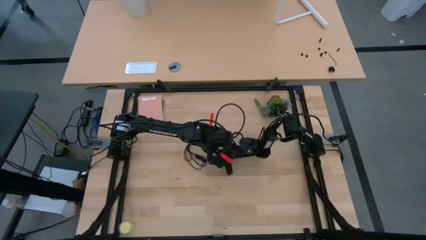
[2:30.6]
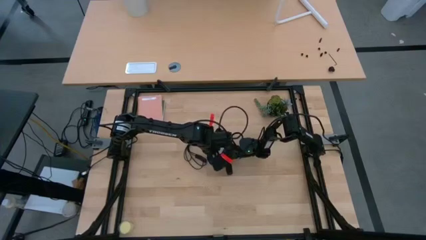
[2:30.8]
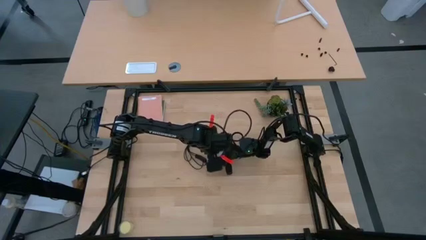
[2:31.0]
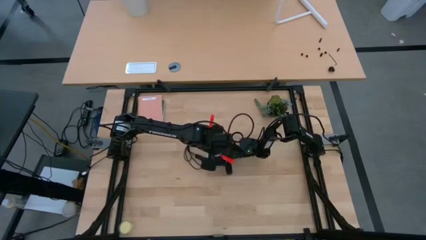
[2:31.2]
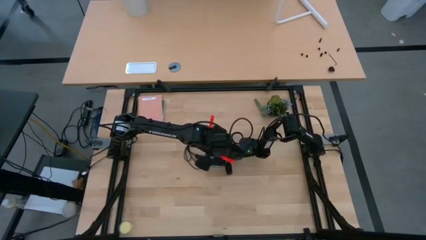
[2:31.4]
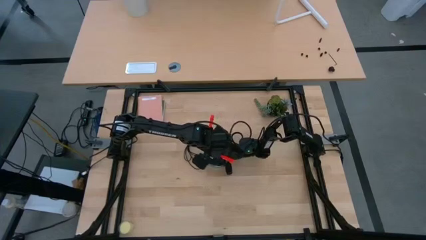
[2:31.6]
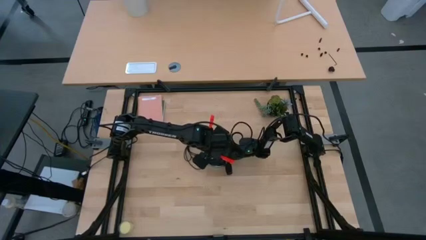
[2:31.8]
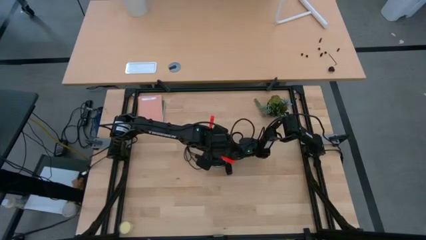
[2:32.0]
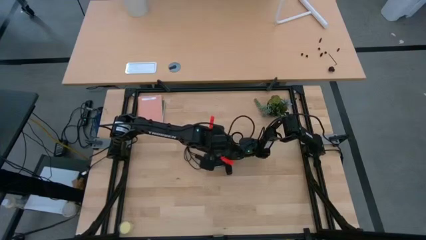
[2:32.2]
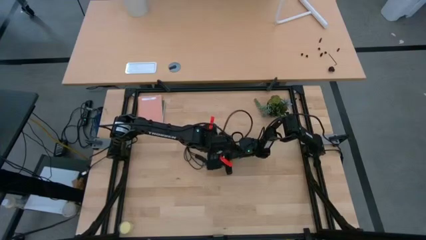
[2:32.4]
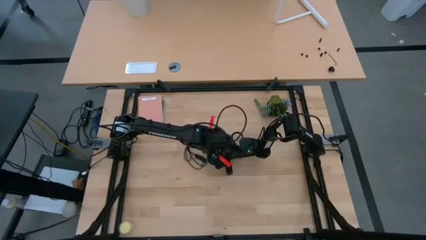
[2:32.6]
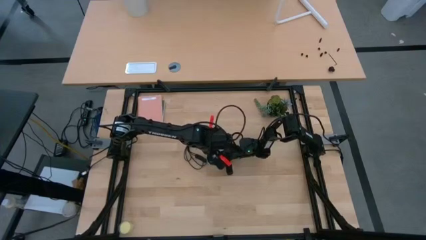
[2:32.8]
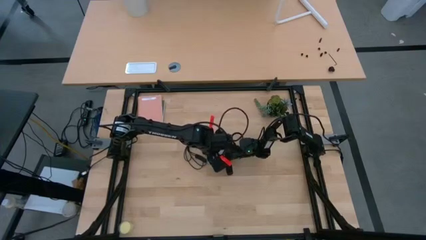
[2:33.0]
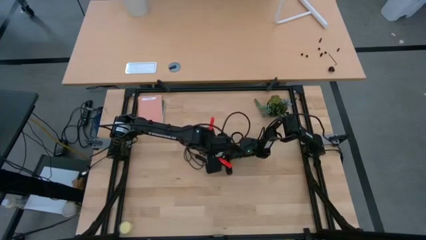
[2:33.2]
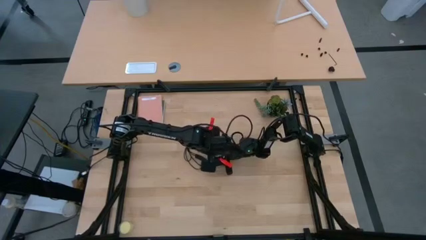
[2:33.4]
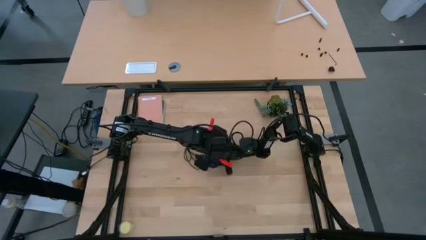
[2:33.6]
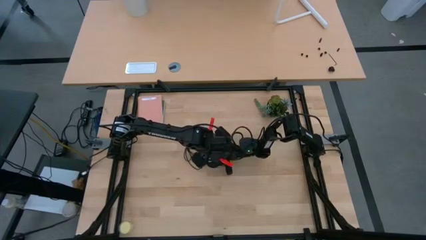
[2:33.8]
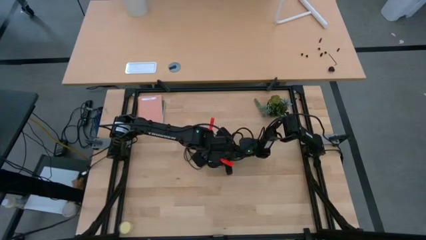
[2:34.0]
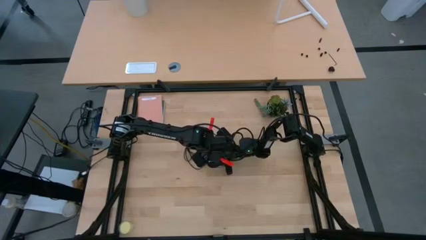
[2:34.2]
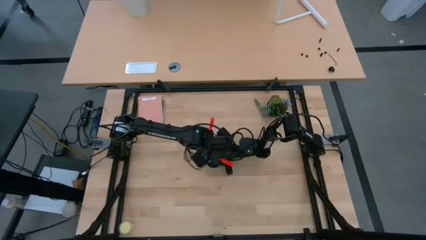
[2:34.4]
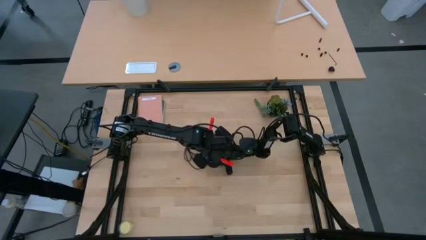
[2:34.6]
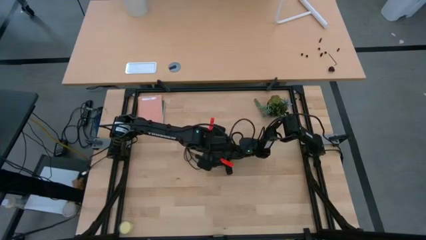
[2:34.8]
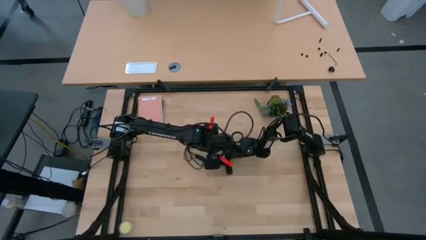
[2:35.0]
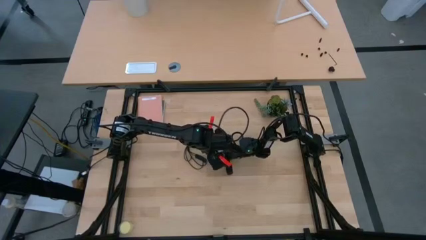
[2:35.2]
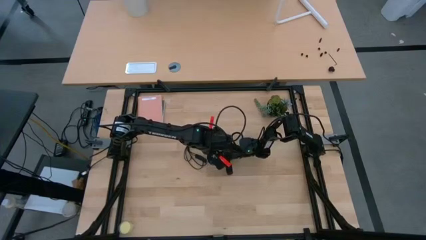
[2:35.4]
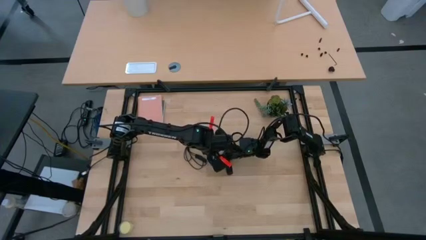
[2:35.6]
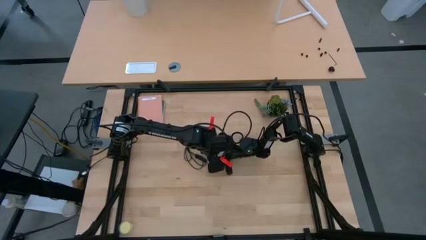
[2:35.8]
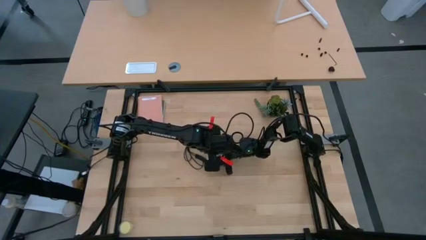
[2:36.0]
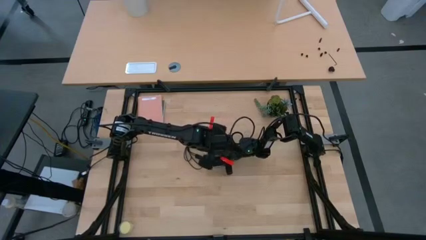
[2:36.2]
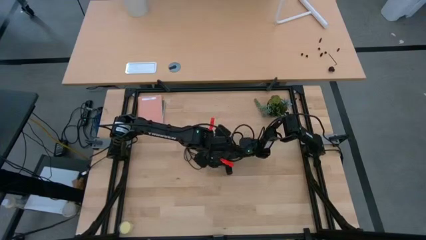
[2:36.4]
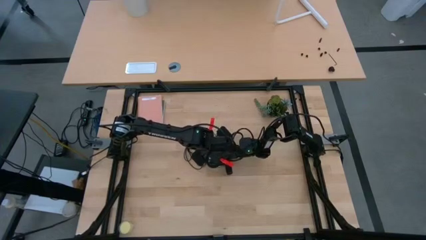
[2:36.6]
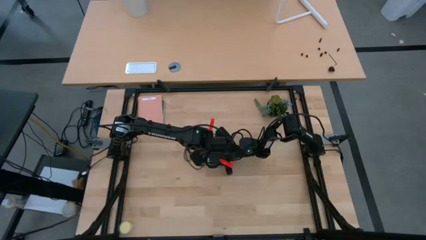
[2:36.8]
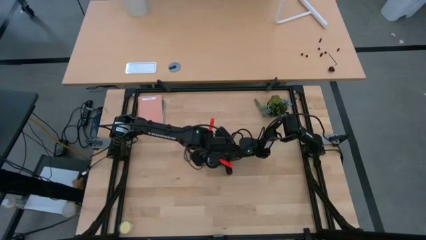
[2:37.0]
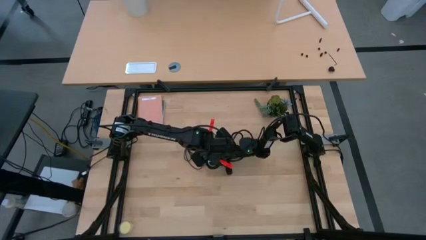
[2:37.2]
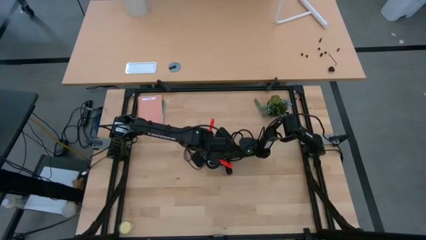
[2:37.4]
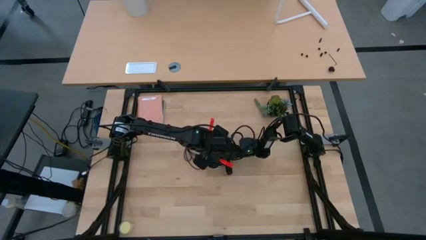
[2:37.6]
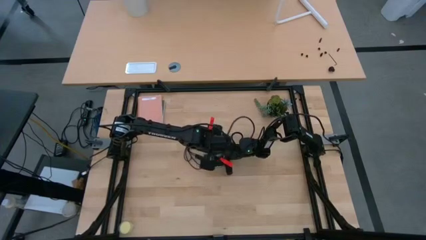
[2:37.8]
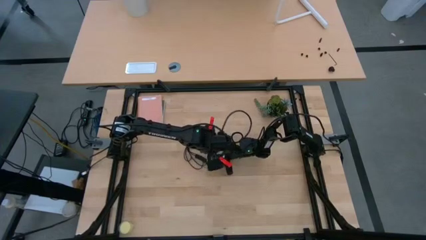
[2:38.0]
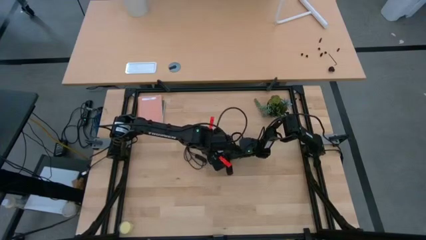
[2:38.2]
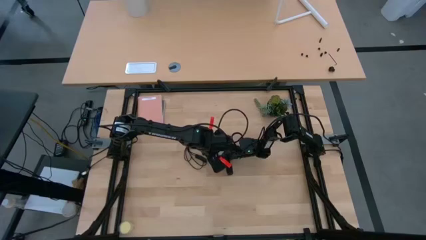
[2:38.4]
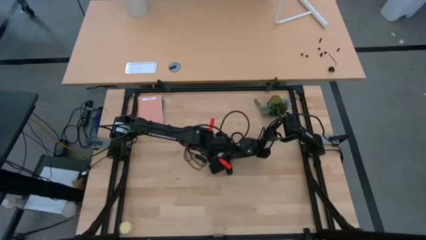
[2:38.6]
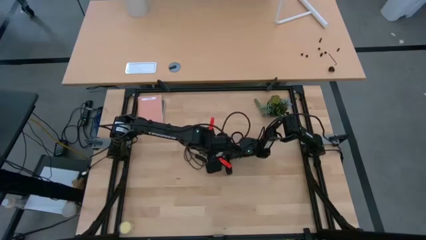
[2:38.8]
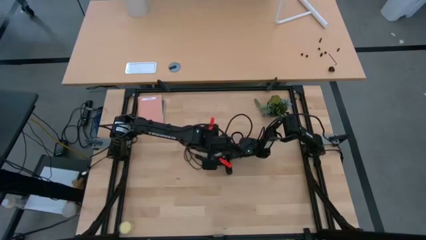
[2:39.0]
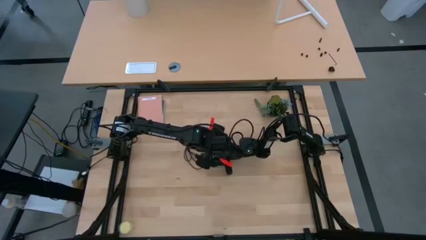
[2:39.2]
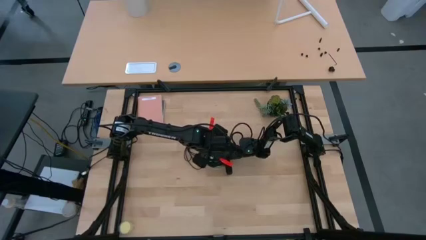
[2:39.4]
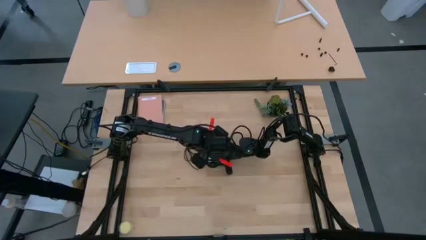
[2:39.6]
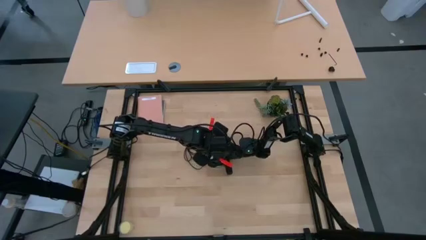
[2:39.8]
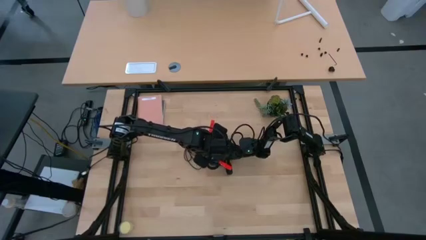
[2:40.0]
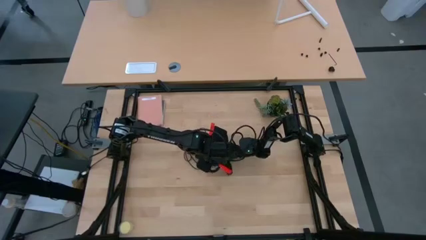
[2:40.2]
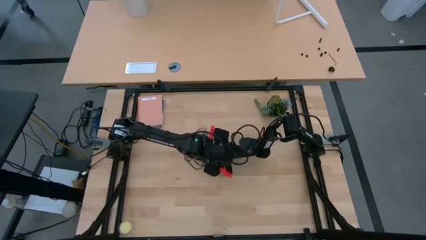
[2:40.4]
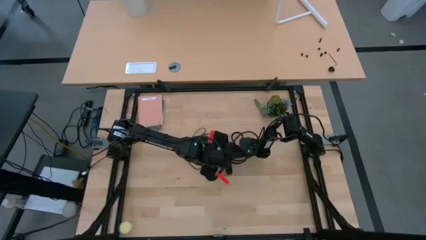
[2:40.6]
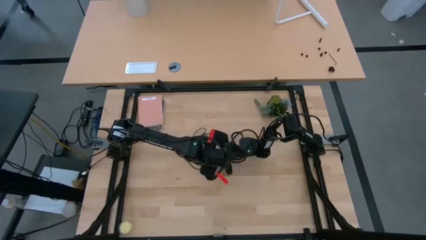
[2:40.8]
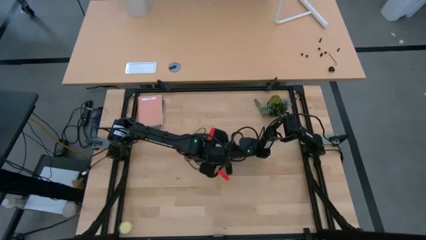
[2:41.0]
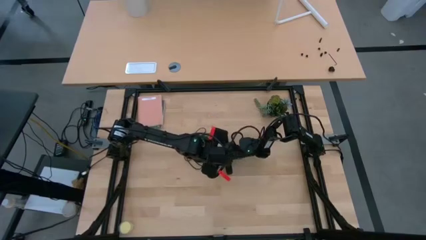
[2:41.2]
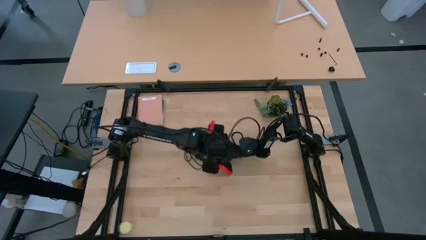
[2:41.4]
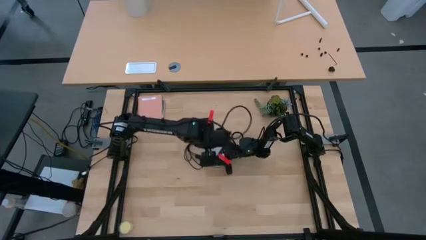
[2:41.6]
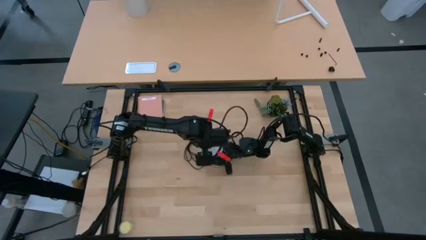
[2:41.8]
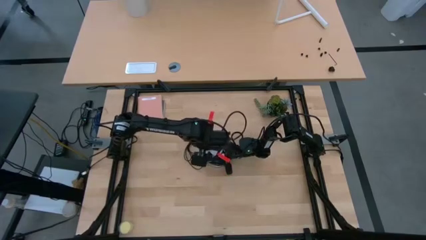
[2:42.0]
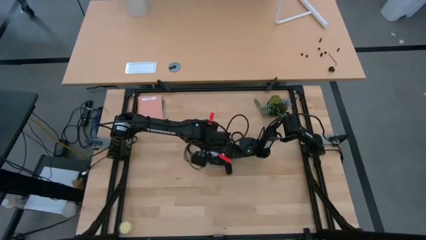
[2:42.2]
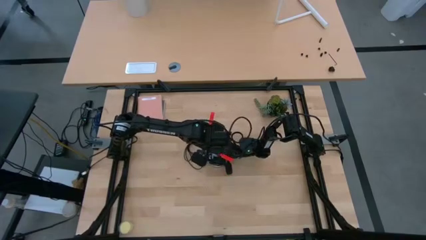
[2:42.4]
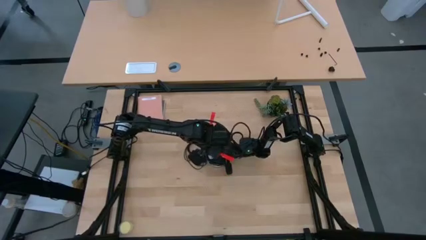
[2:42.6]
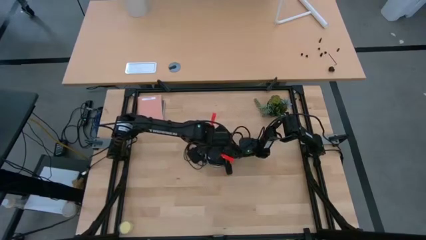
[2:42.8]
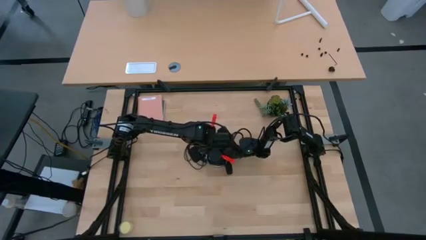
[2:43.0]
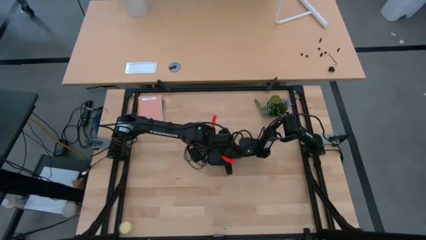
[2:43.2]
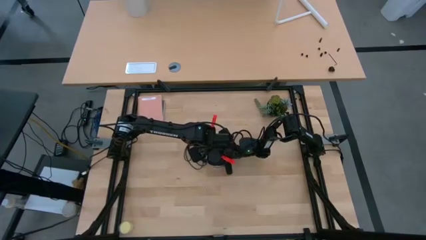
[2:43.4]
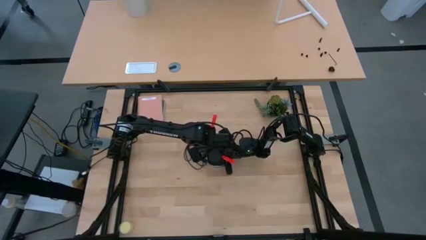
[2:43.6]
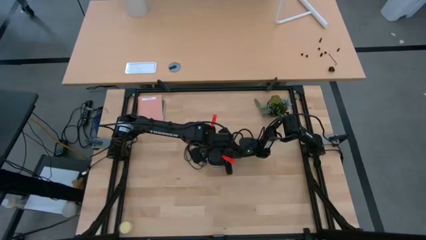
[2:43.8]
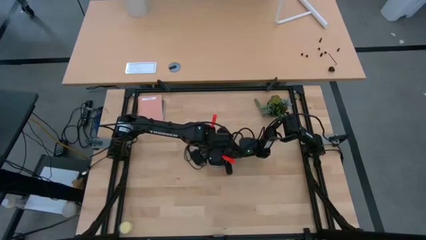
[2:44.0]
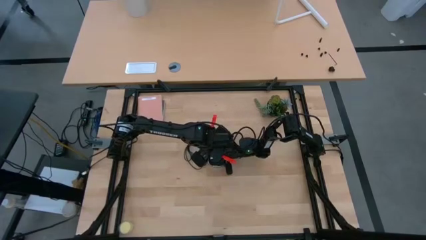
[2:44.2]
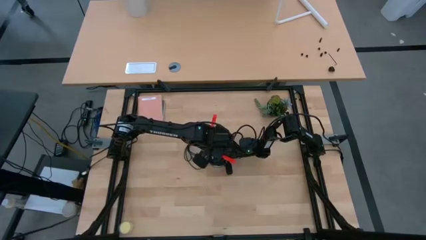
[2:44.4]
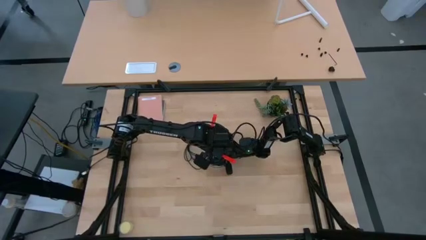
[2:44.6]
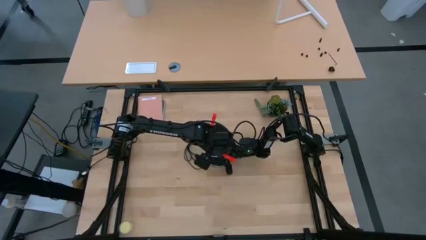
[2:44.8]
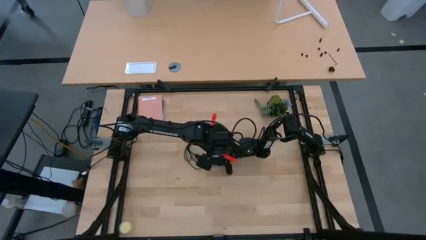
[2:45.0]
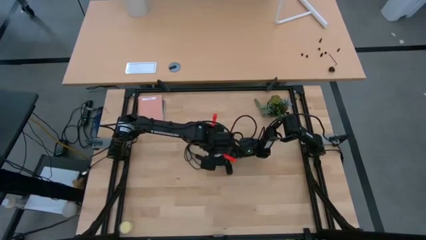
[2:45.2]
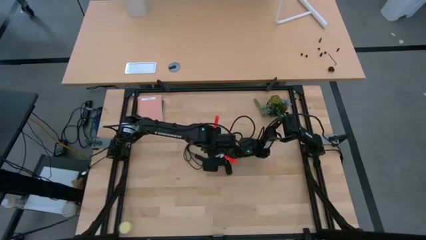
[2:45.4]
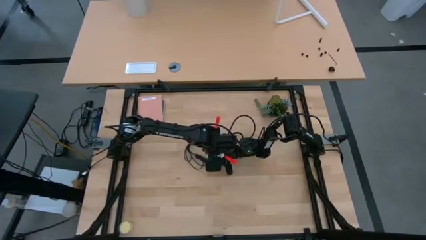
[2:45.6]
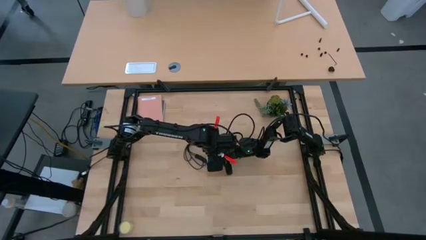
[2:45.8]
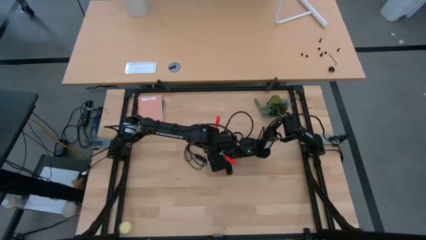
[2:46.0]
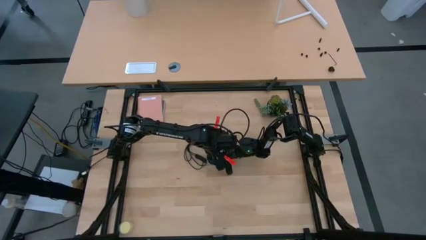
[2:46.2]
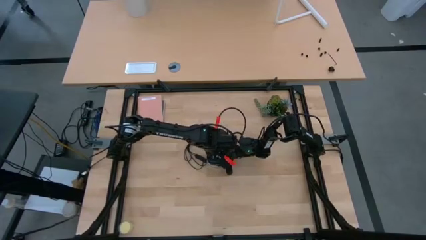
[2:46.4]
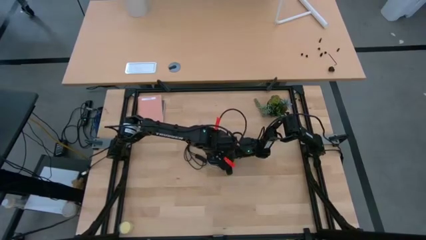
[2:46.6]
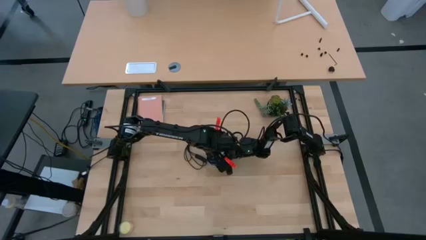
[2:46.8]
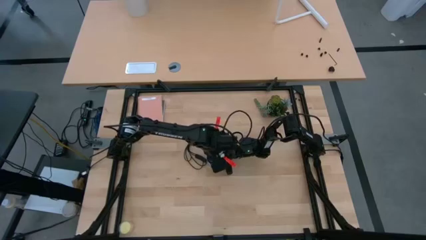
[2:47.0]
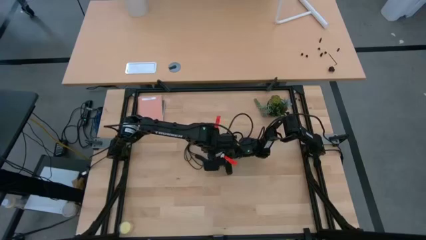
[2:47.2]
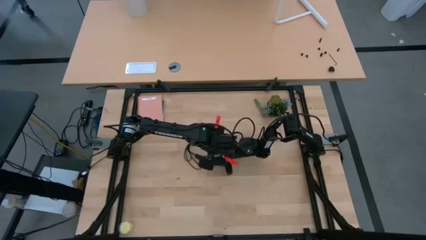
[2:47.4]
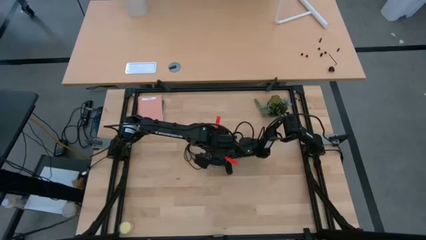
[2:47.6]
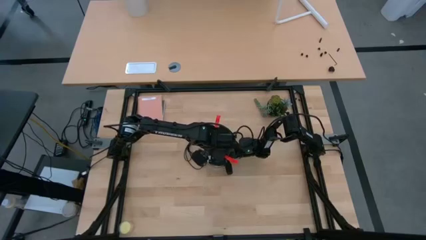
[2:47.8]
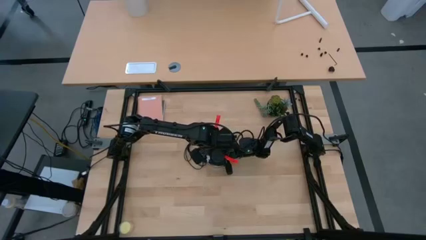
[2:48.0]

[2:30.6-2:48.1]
Task: Screw lightbulb
Remove the white lightbulb from the silver lamp
